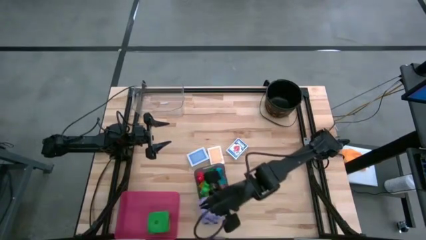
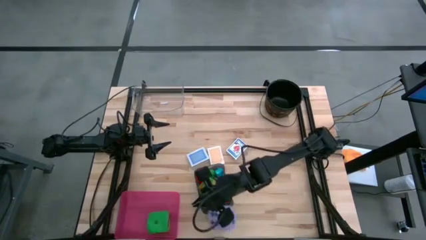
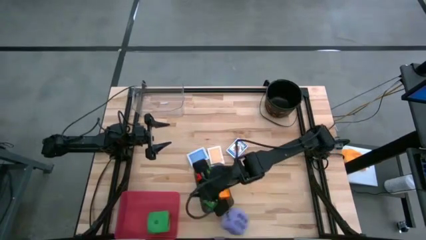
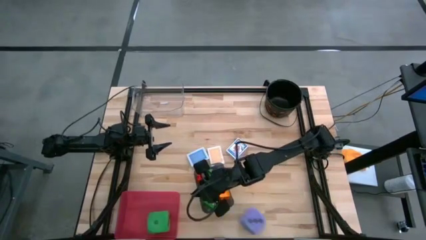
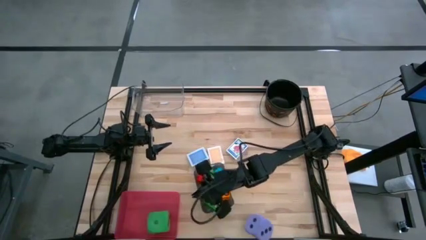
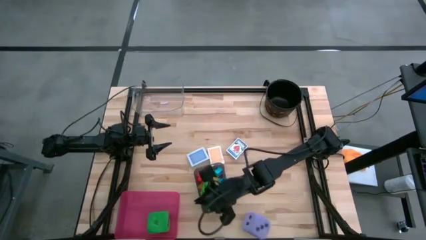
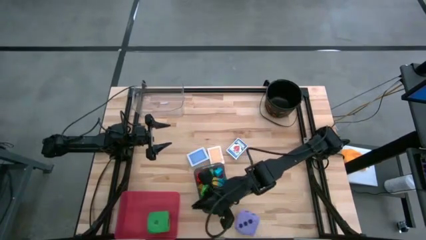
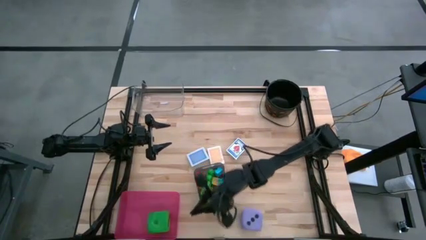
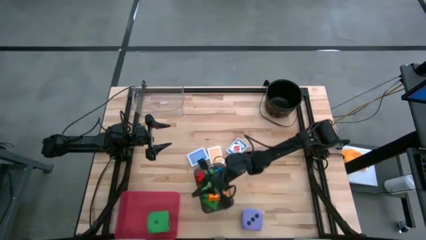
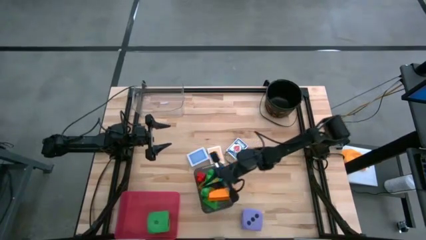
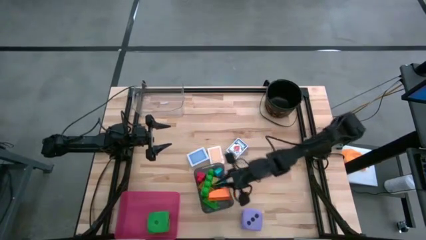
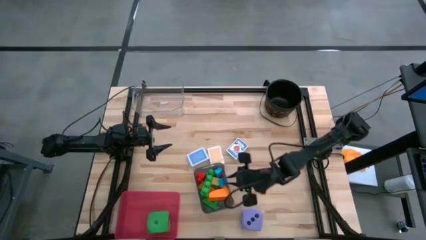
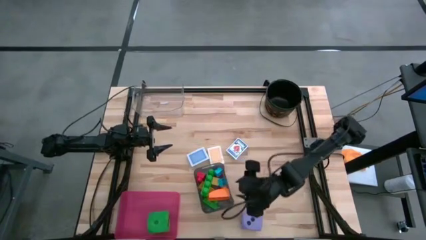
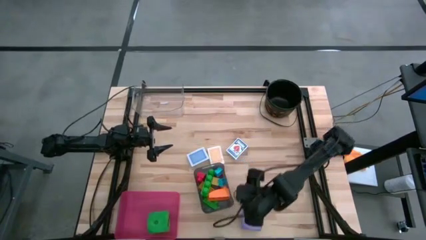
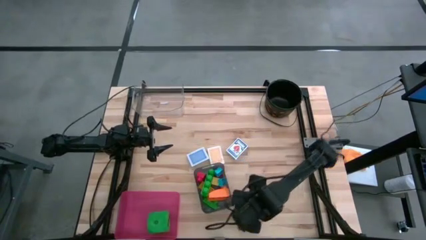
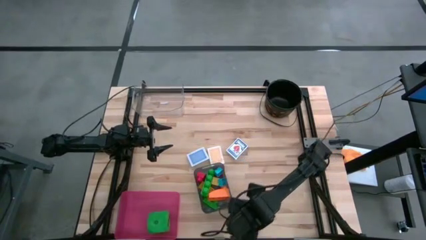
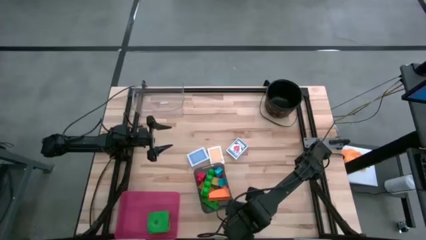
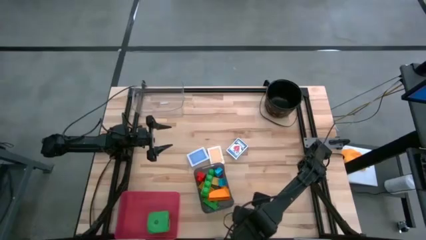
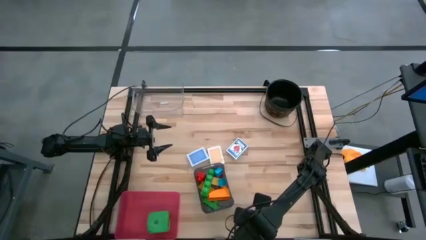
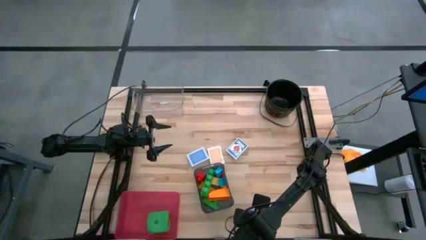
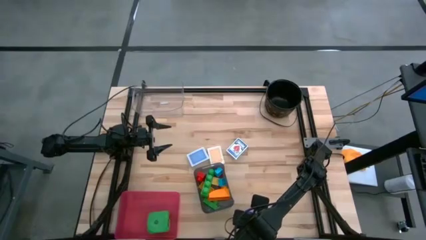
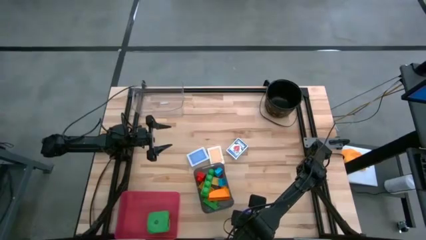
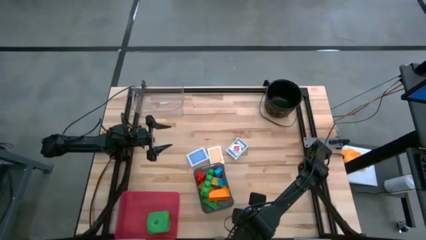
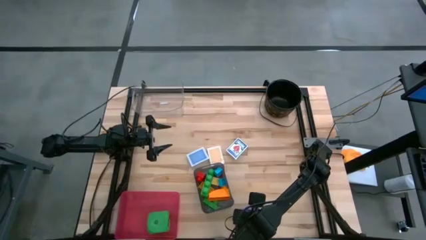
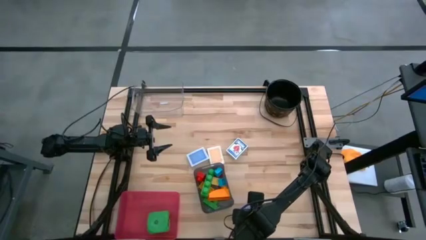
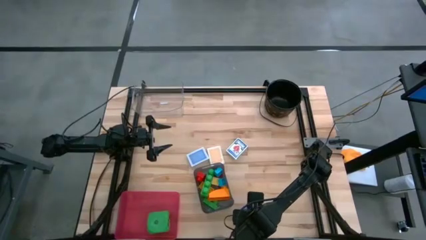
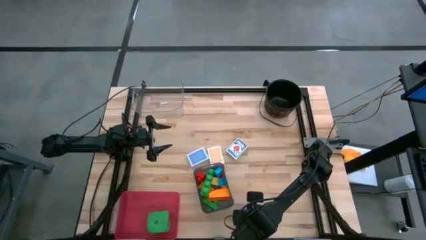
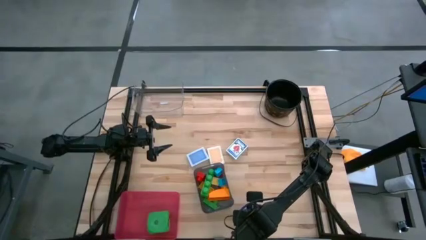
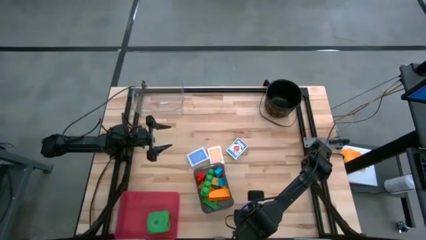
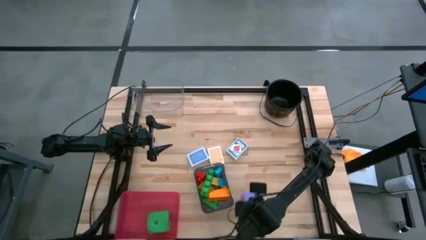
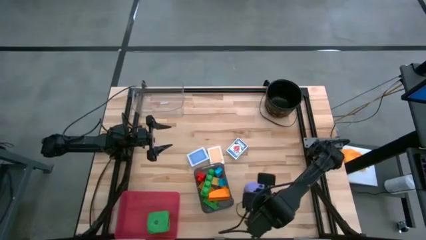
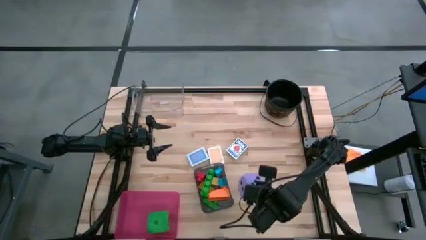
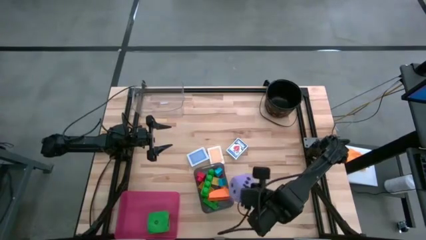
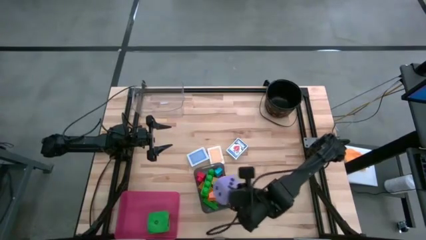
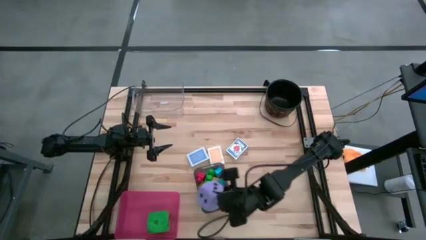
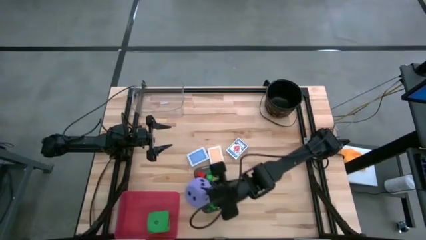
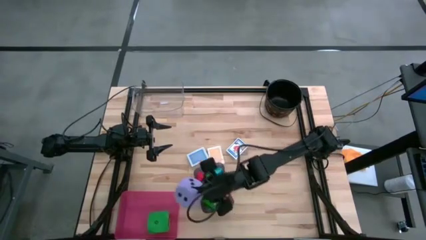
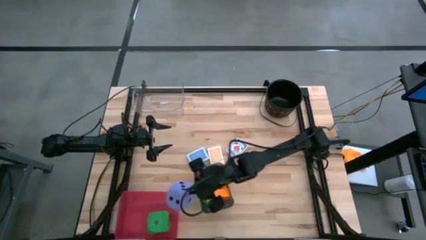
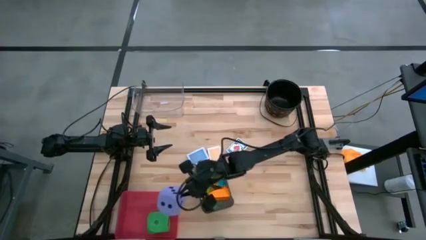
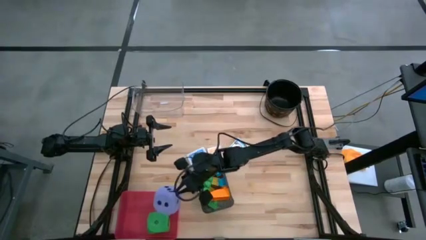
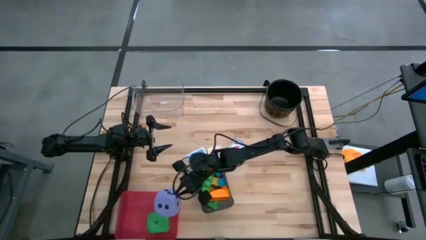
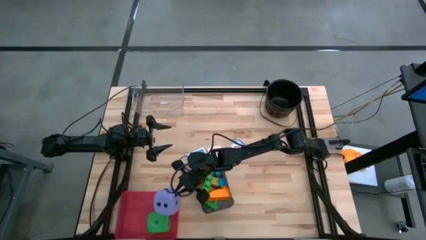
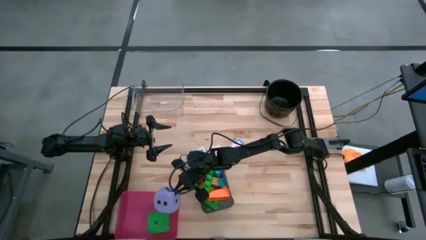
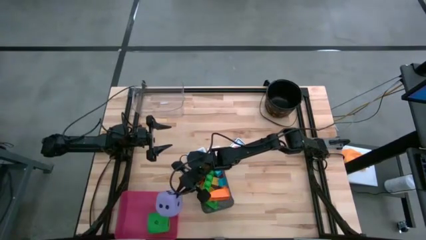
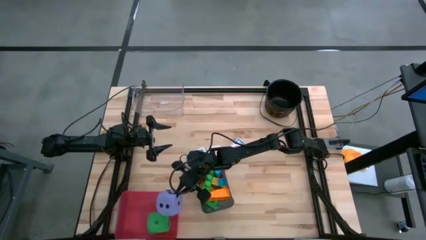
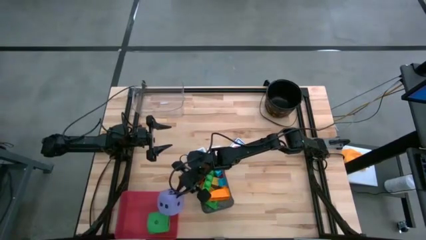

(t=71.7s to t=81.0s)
Task: Pick & Place Toys
Put the blue die into the pink bin

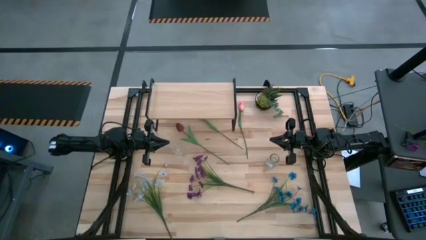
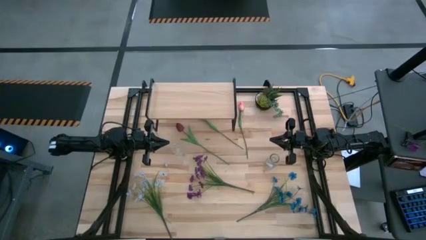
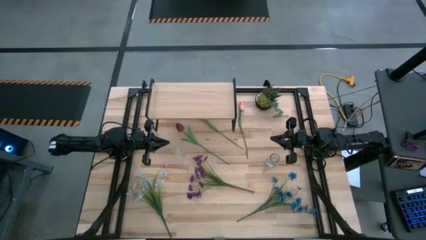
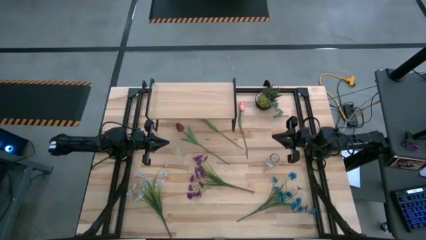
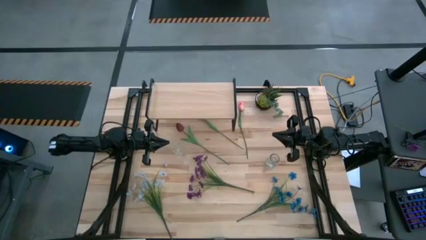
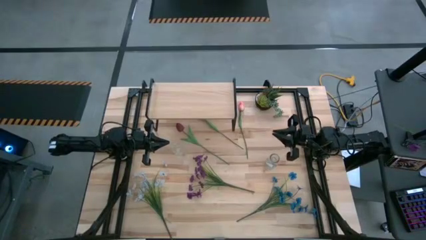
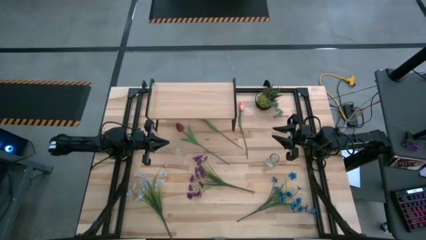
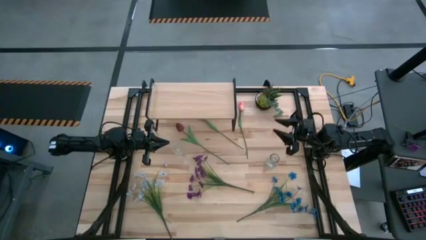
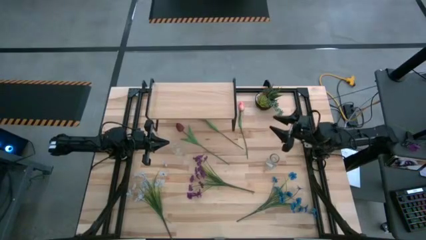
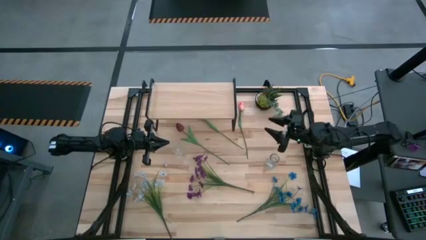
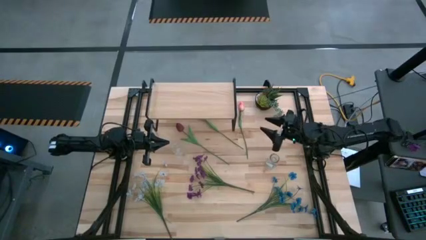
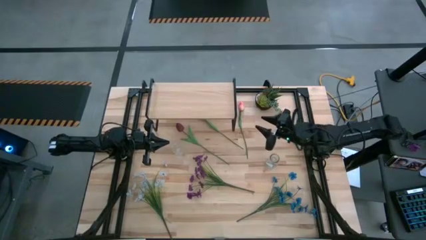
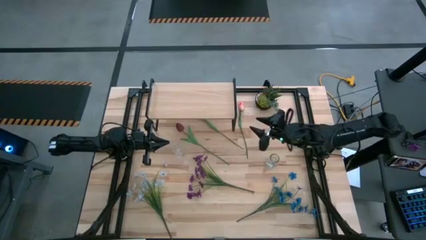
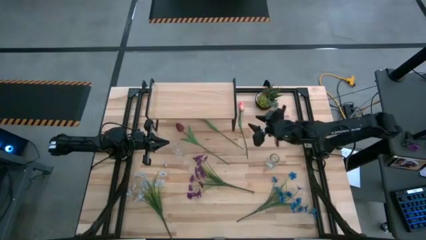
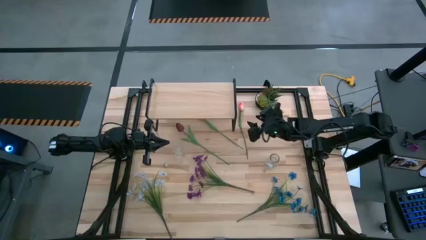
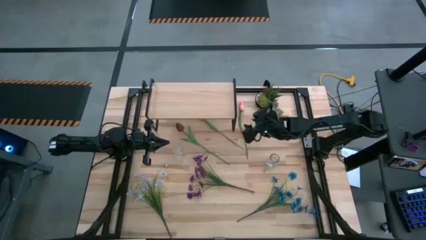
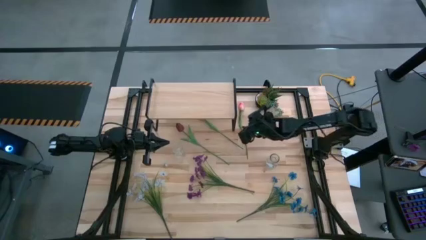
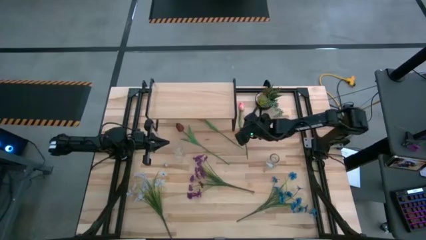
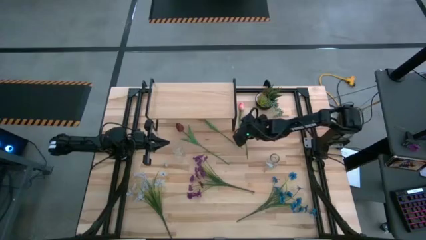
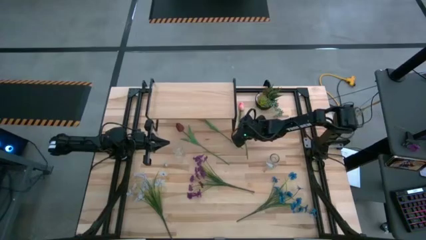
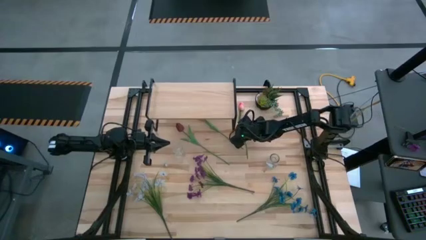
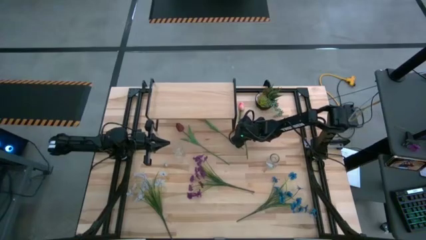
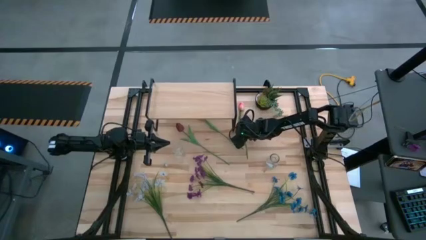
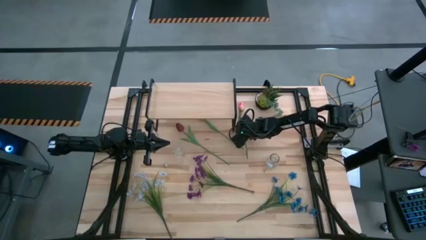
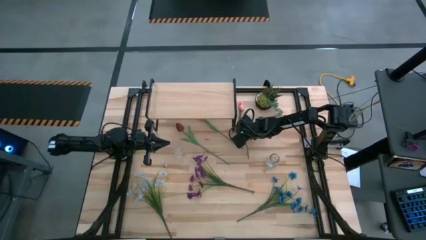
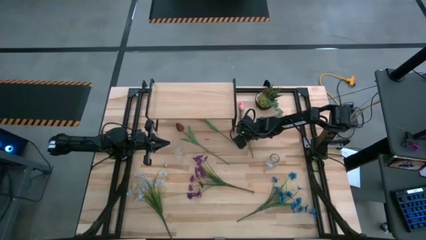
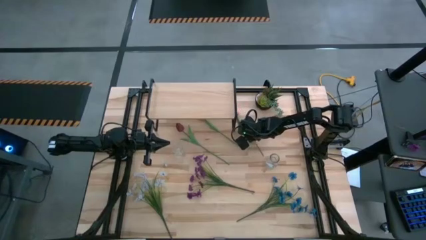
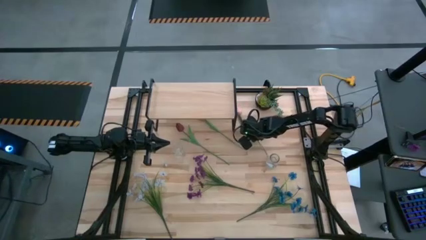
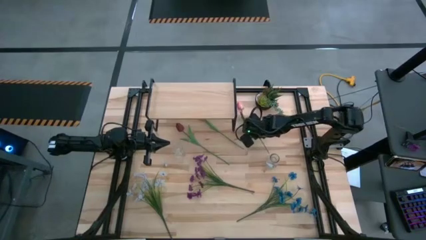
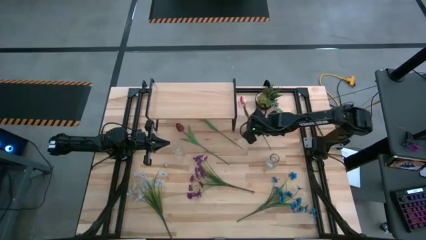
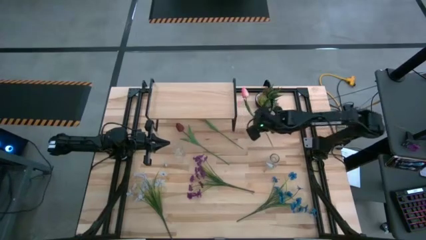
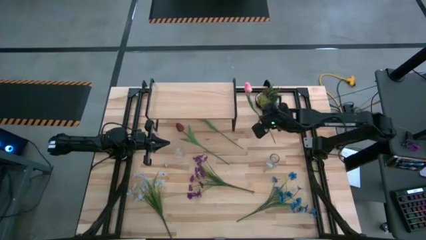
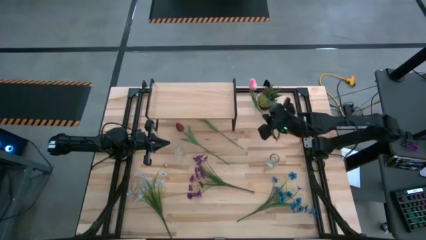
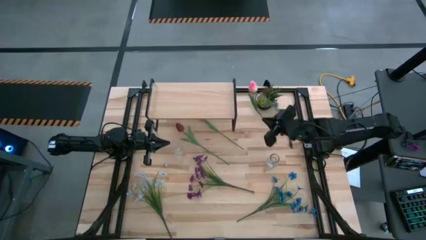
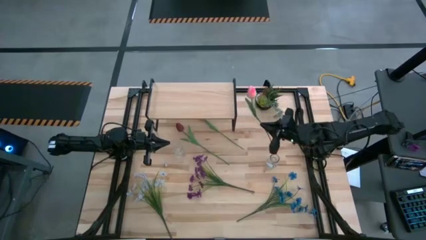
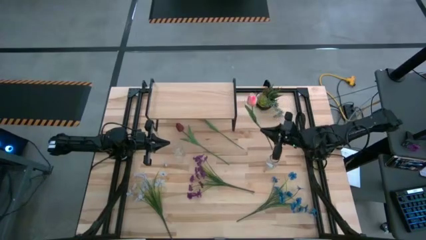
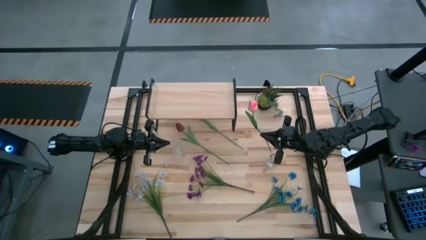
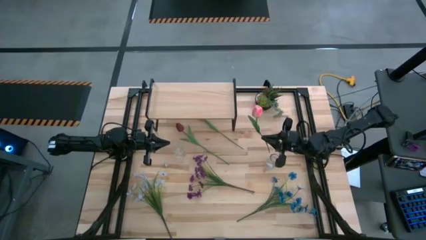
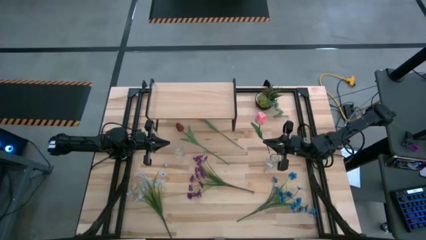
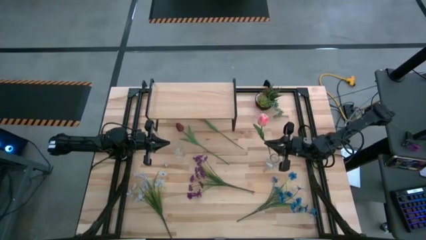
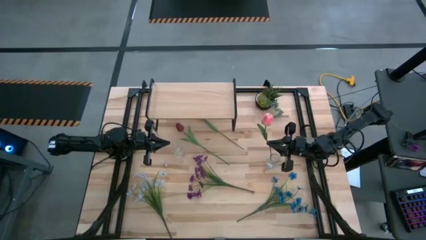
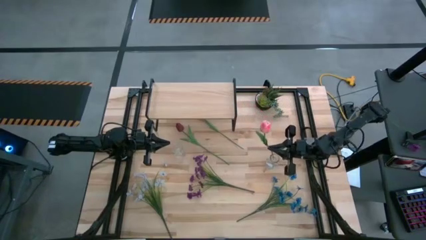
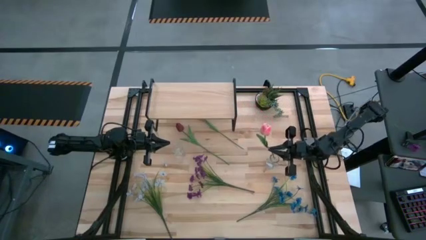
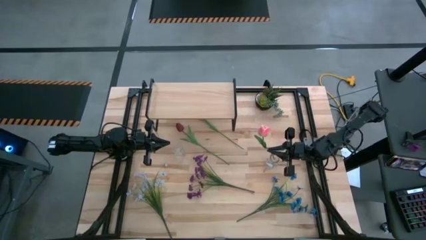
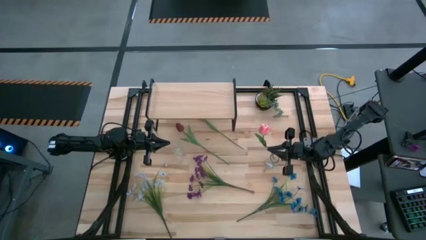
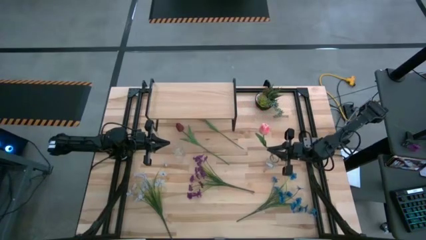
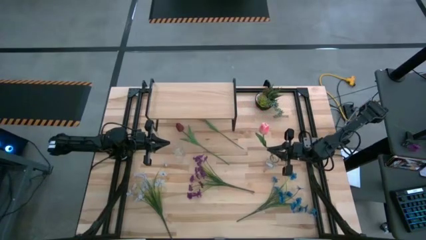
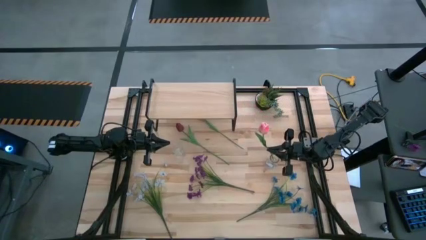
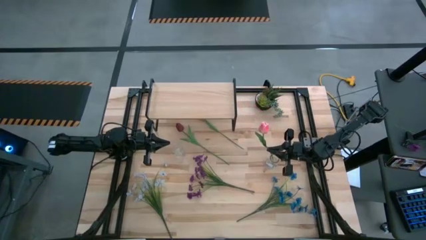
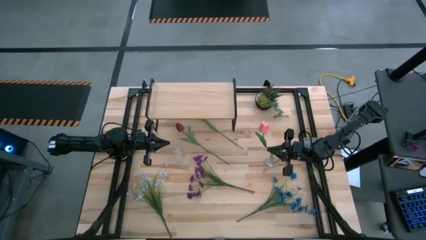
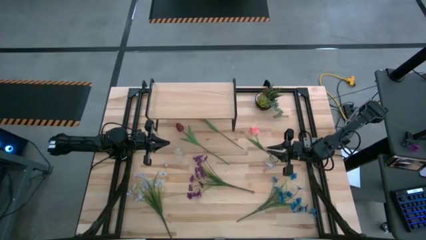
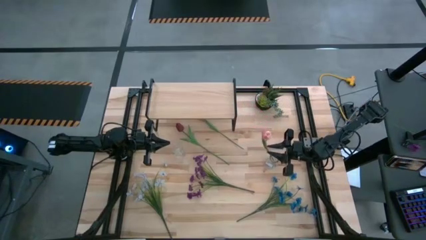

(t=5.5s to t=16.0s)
Task: Pick and place flowers into a vace then onto a shelf
Put the pink flower into the right transparent vase
